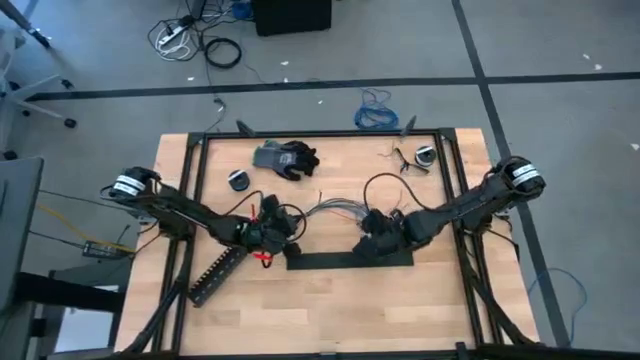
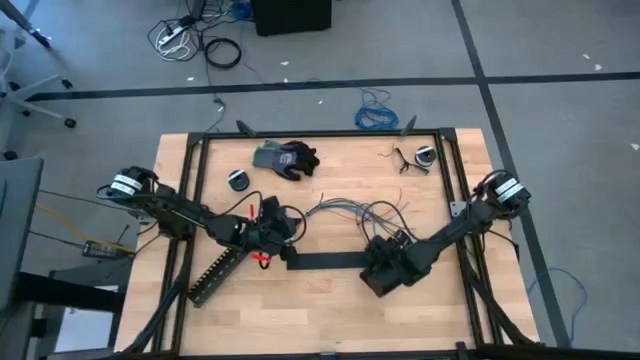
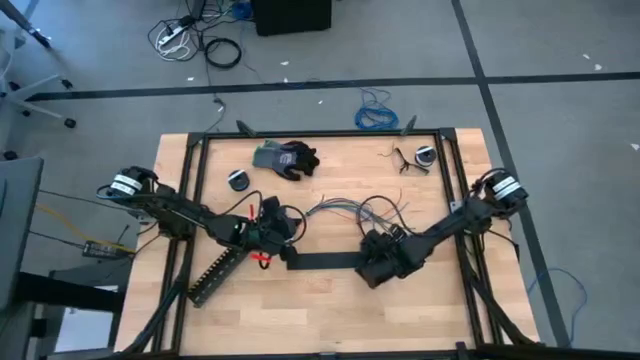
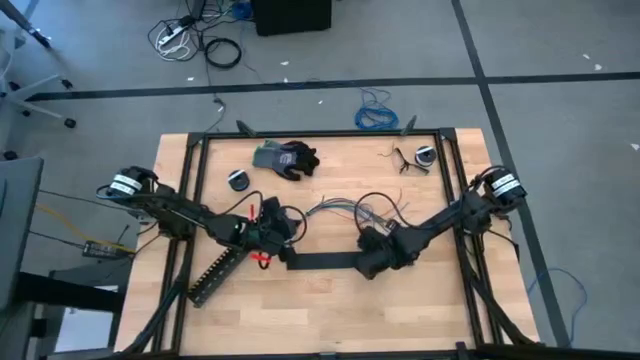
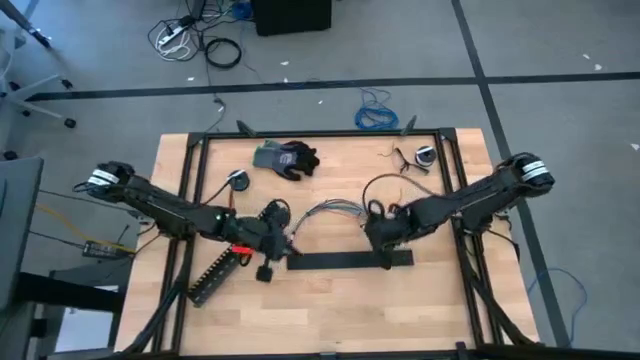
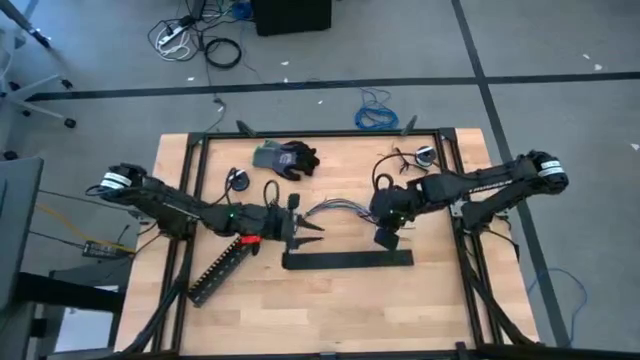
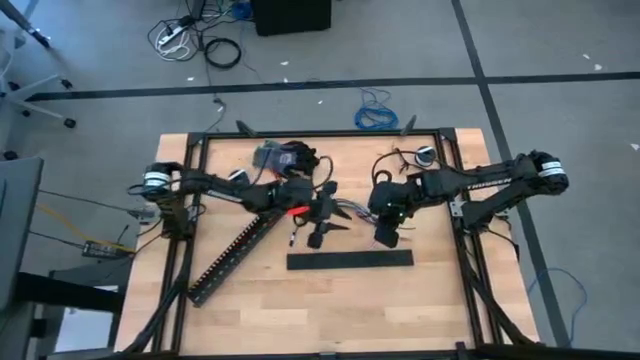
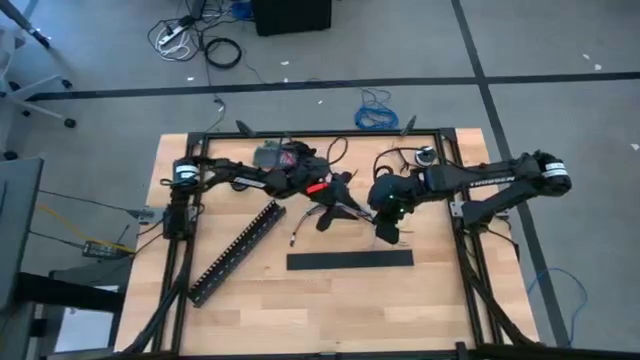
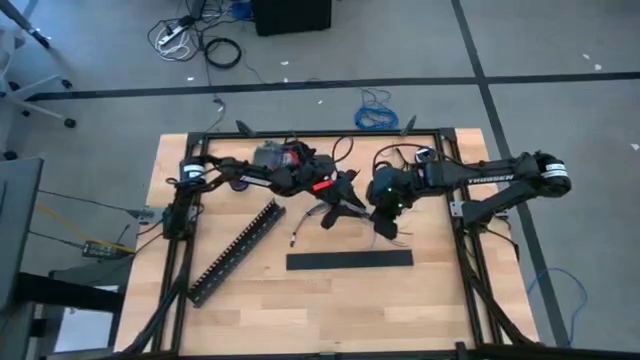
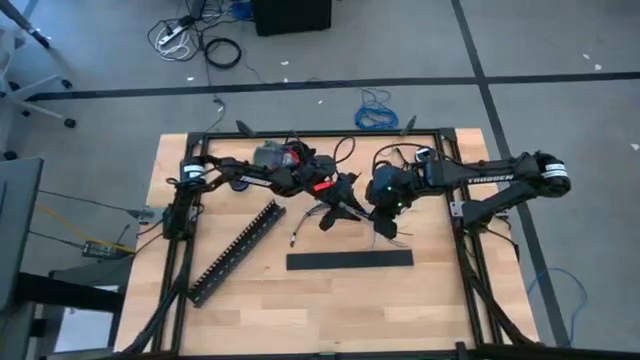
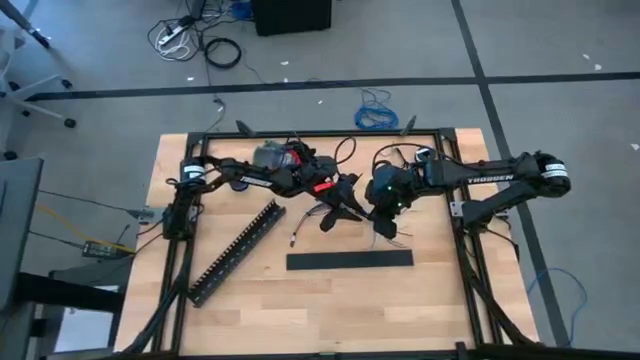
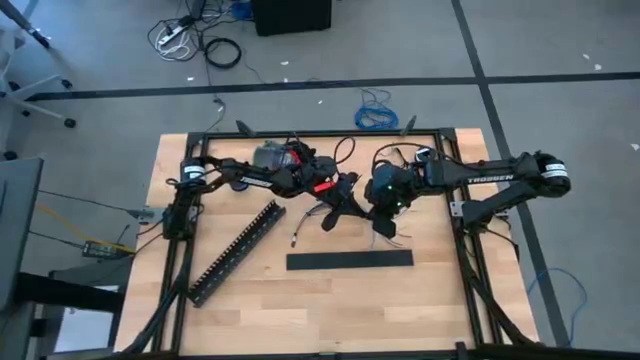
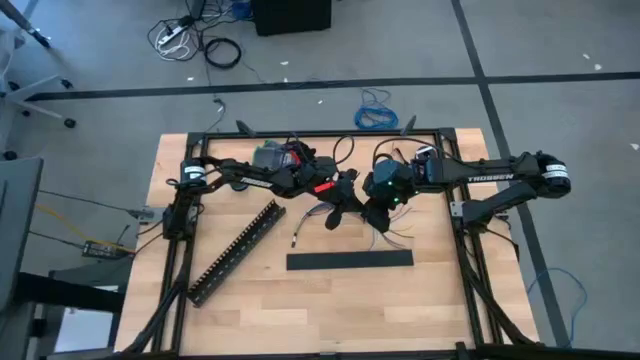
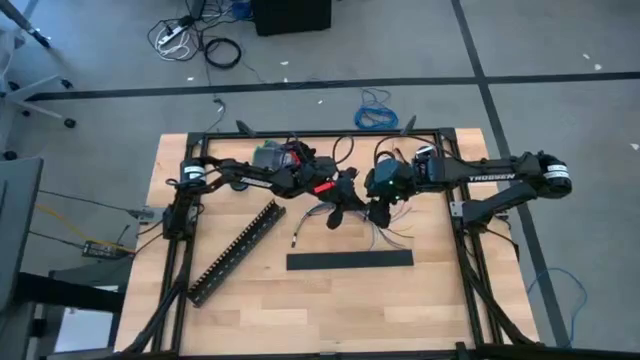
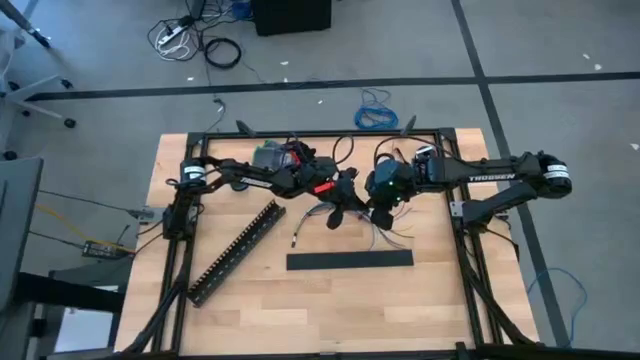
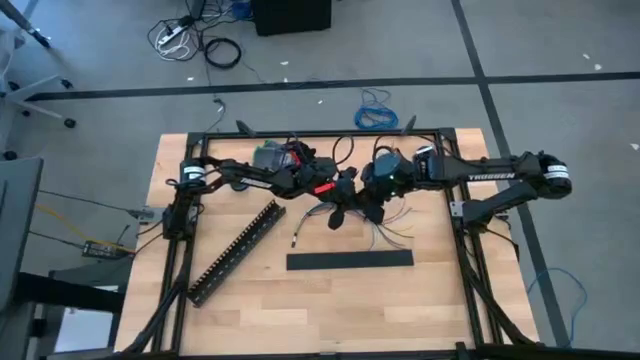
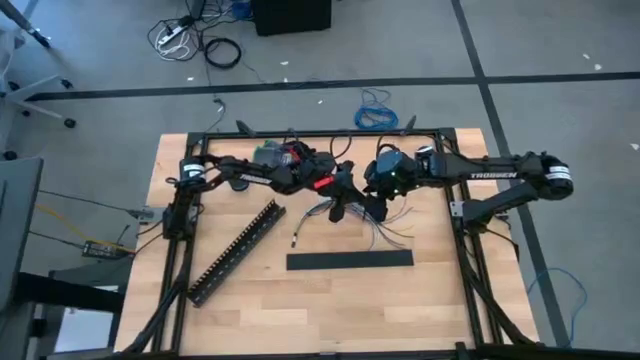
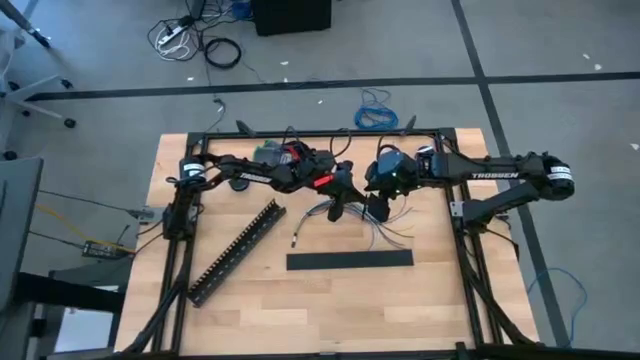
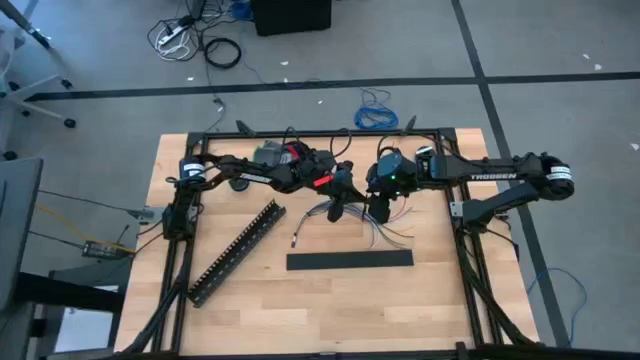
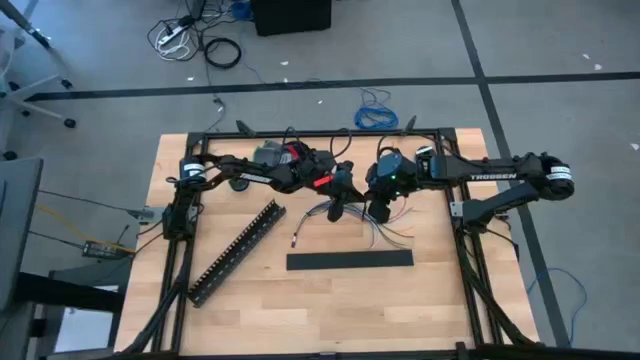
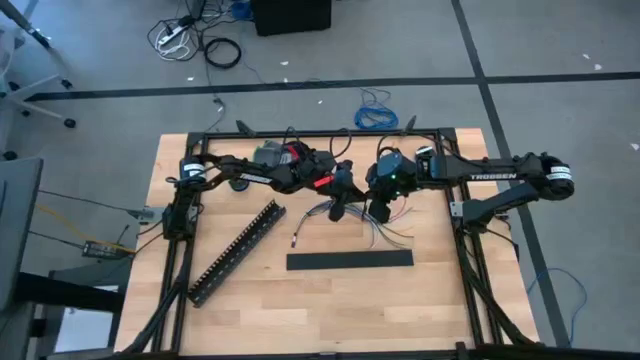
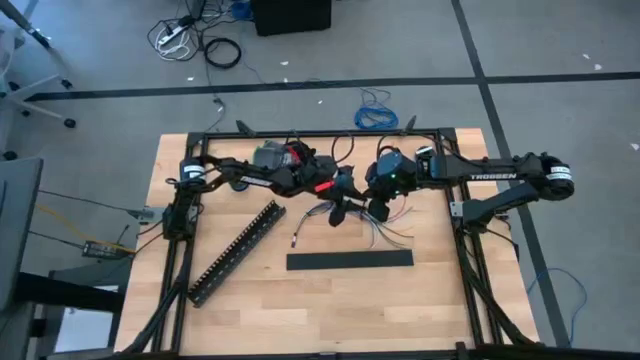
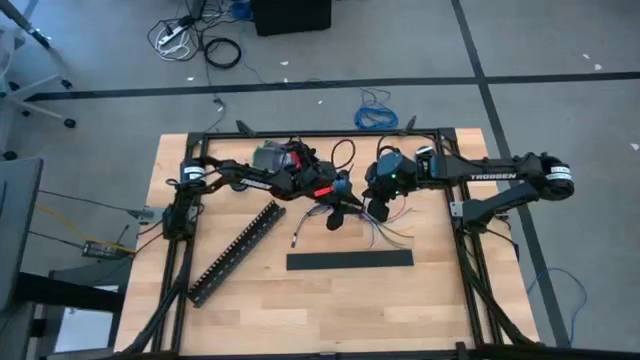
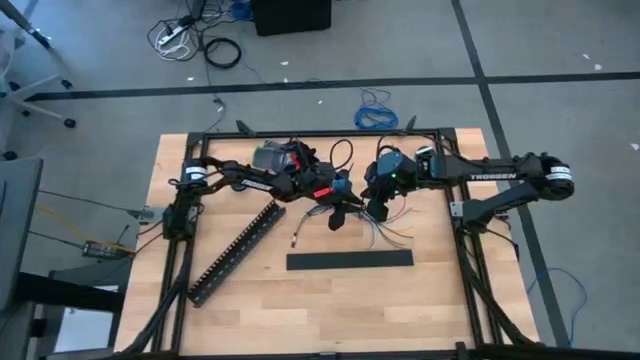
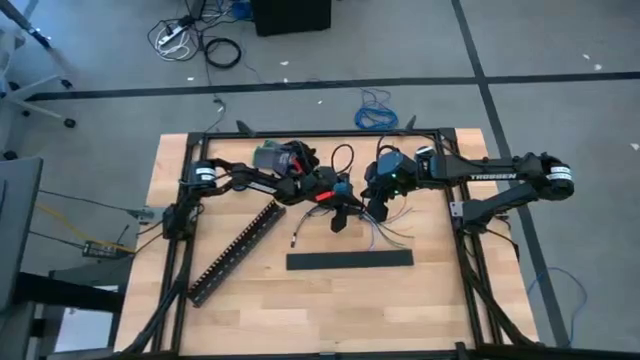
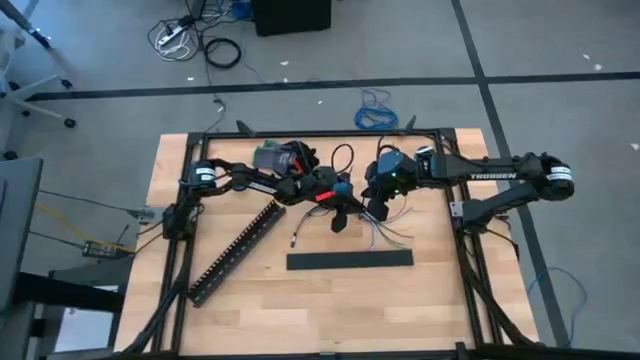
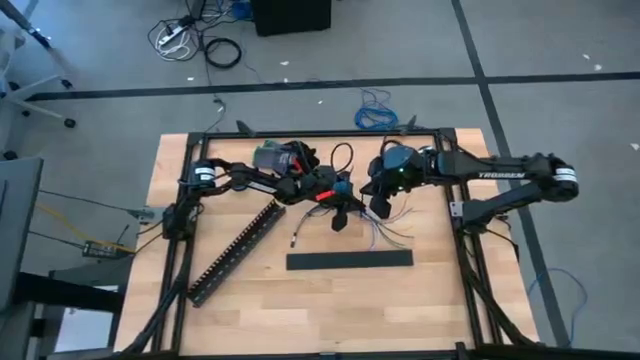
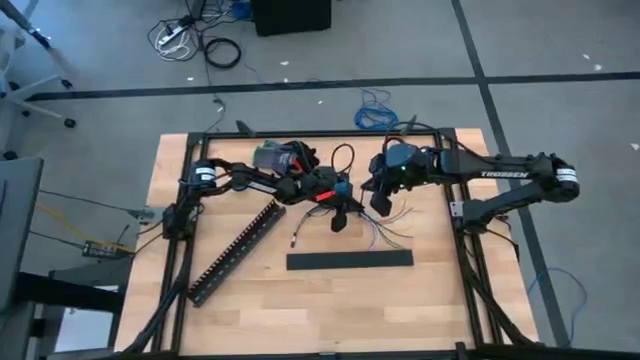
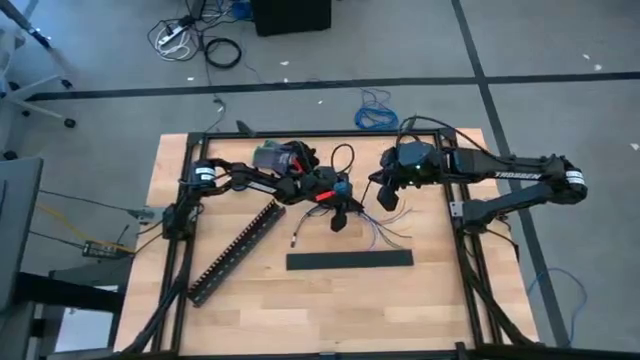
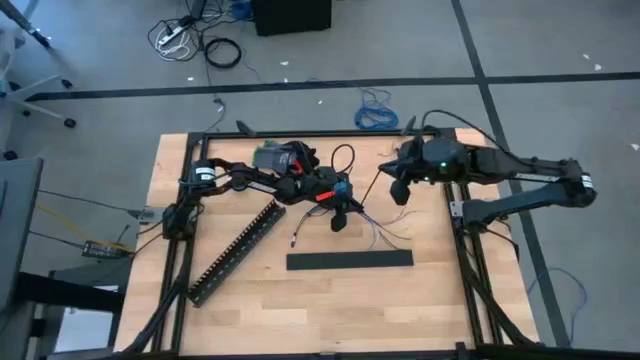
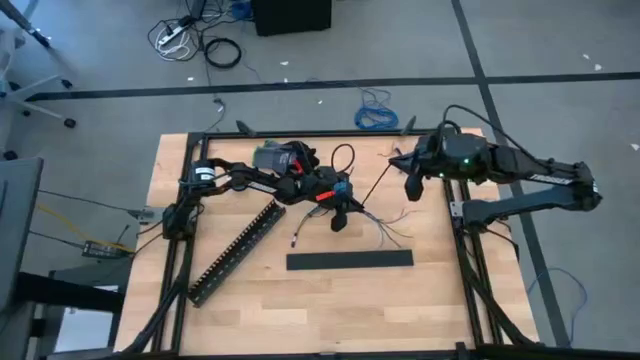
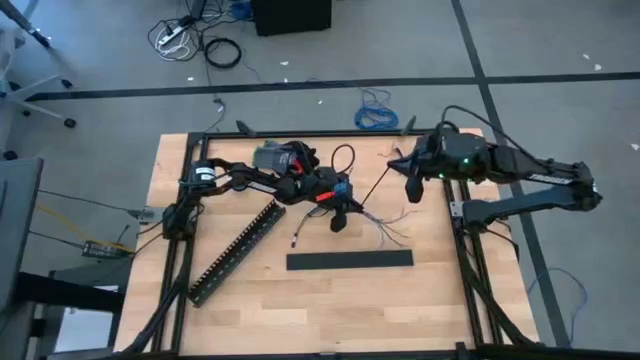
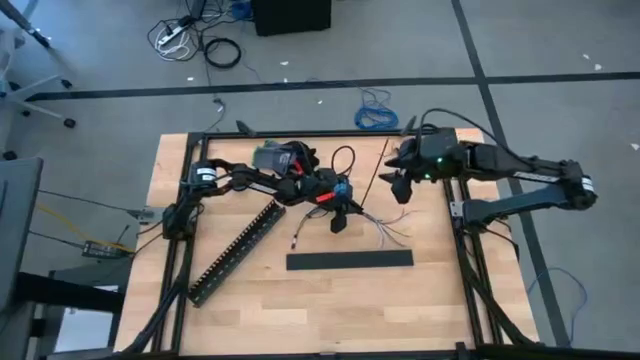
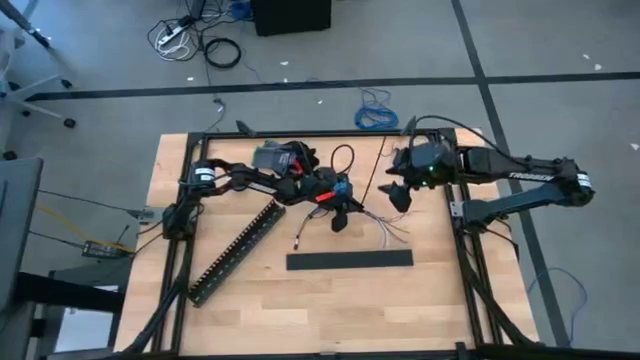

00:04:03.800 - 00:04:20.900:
Task: Ziptie cables
Wrap the black zip tie on the cable wires
